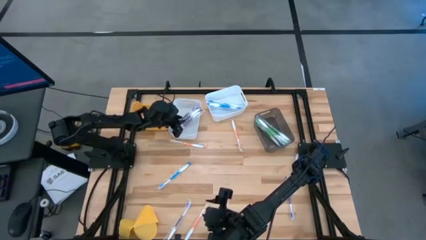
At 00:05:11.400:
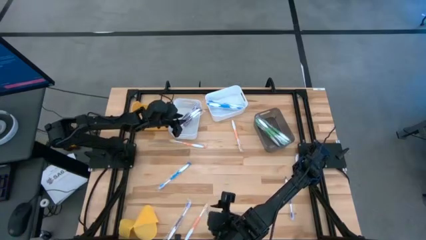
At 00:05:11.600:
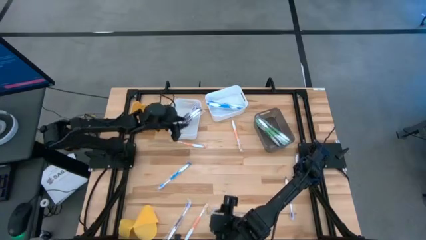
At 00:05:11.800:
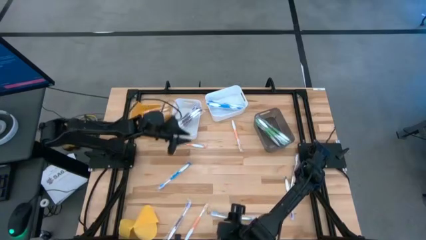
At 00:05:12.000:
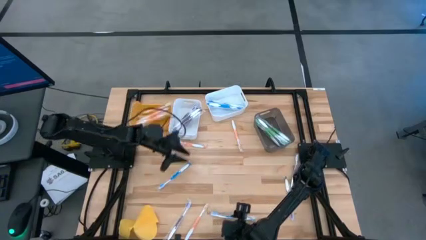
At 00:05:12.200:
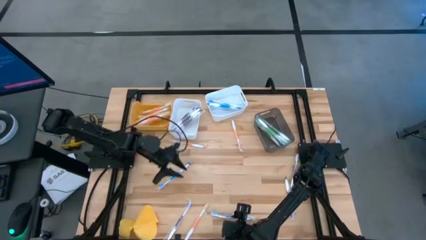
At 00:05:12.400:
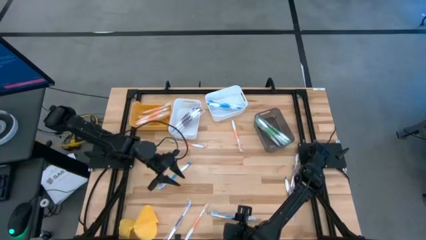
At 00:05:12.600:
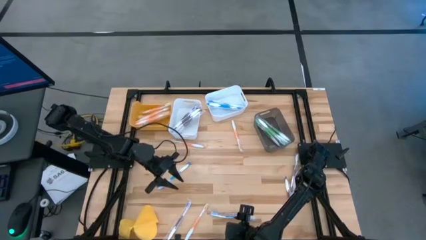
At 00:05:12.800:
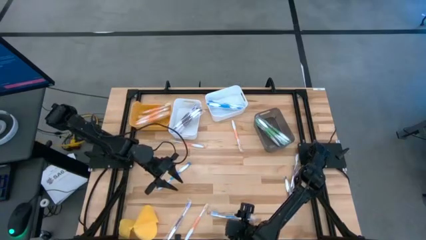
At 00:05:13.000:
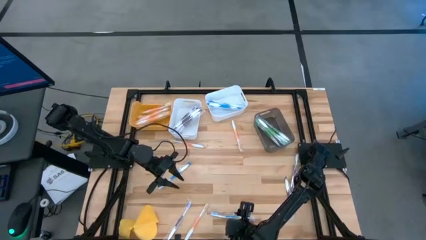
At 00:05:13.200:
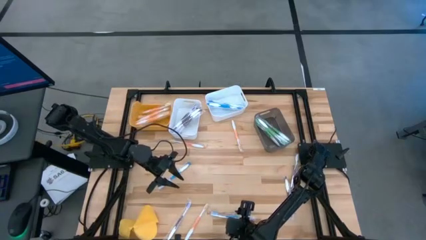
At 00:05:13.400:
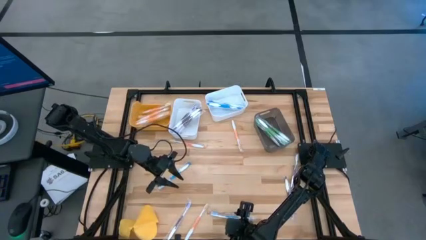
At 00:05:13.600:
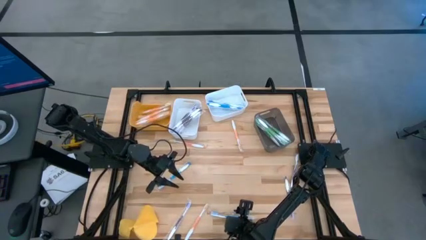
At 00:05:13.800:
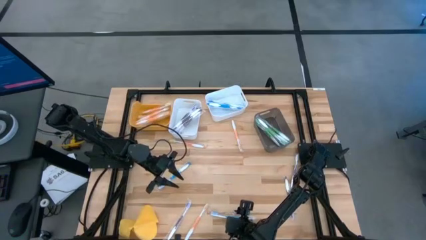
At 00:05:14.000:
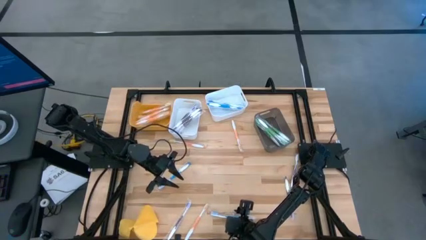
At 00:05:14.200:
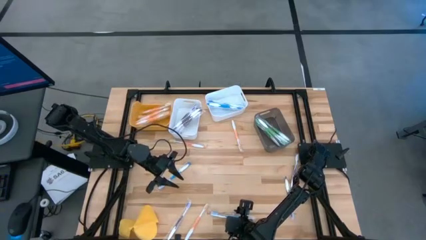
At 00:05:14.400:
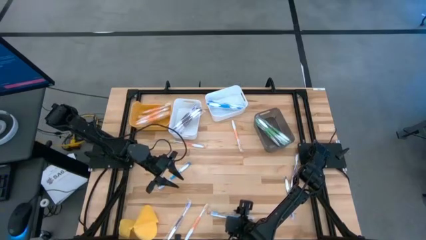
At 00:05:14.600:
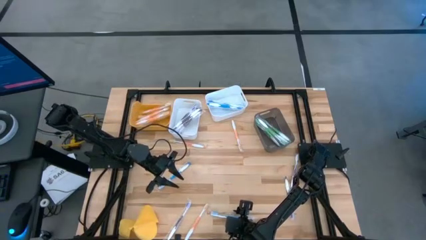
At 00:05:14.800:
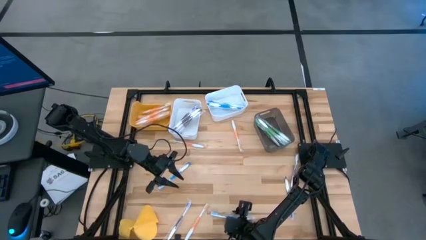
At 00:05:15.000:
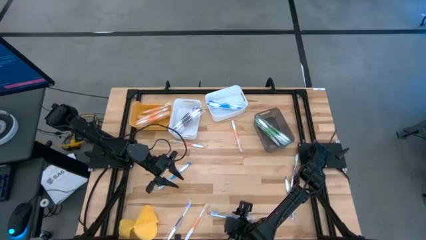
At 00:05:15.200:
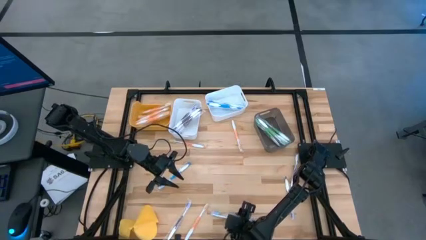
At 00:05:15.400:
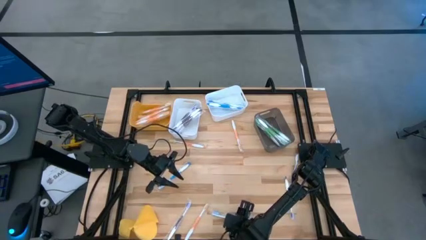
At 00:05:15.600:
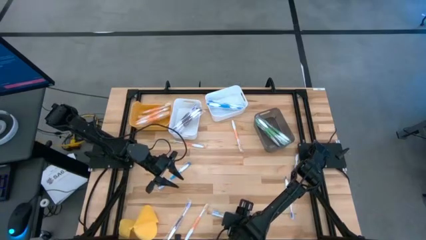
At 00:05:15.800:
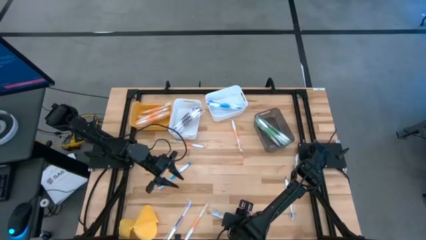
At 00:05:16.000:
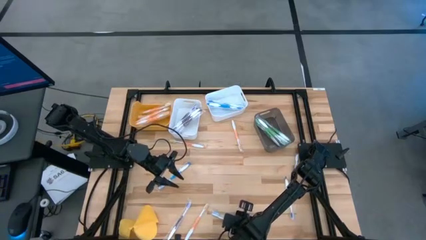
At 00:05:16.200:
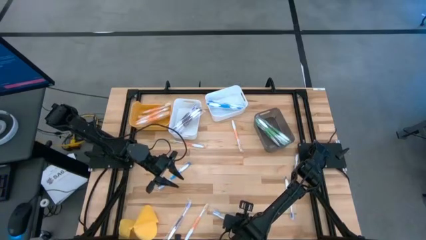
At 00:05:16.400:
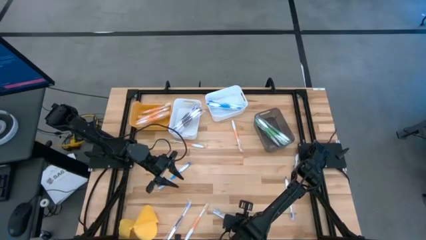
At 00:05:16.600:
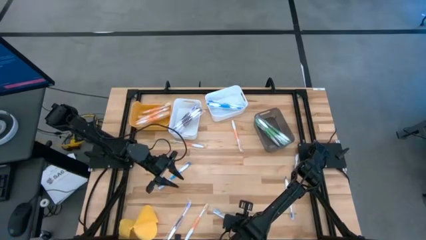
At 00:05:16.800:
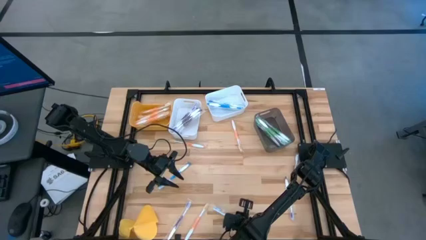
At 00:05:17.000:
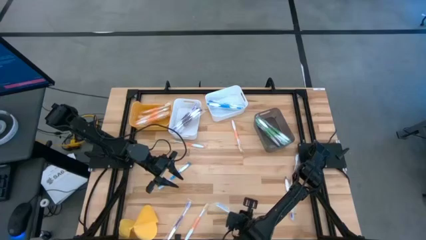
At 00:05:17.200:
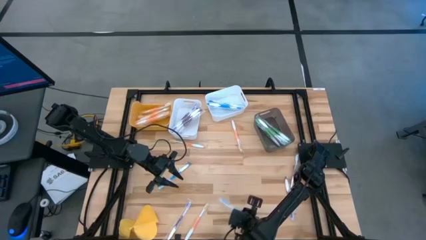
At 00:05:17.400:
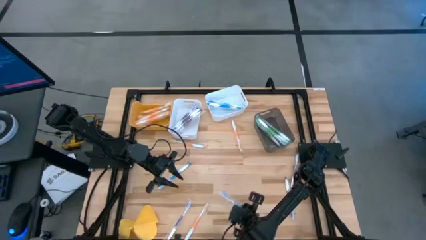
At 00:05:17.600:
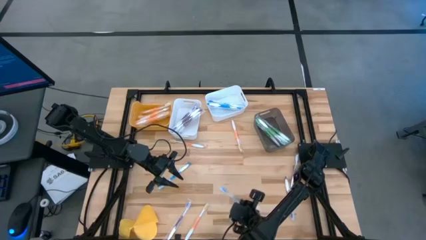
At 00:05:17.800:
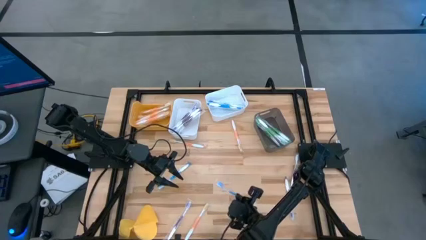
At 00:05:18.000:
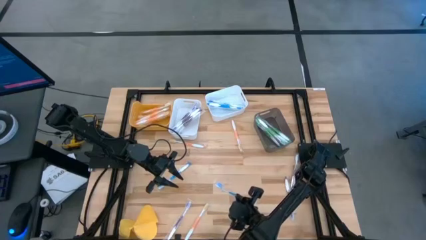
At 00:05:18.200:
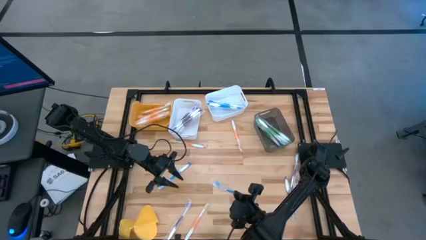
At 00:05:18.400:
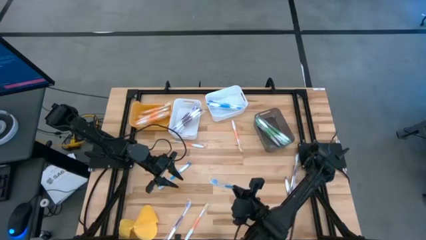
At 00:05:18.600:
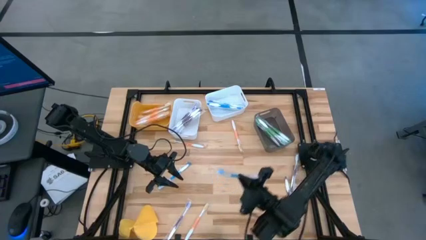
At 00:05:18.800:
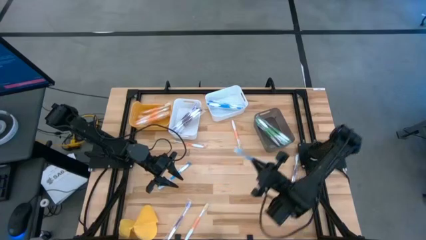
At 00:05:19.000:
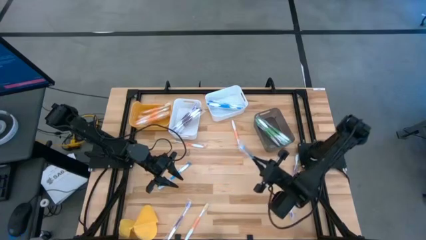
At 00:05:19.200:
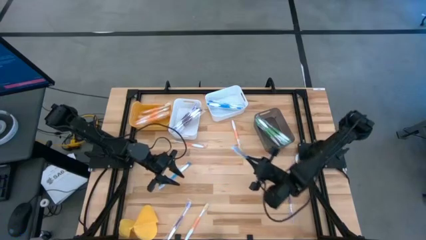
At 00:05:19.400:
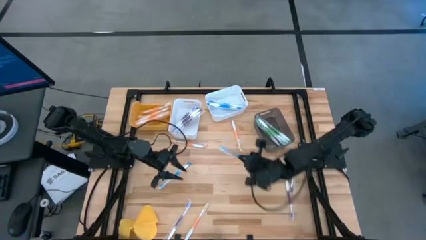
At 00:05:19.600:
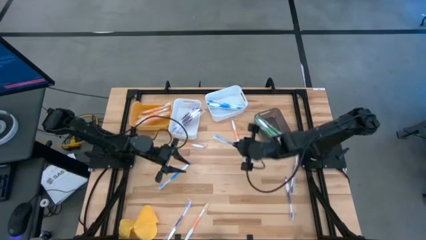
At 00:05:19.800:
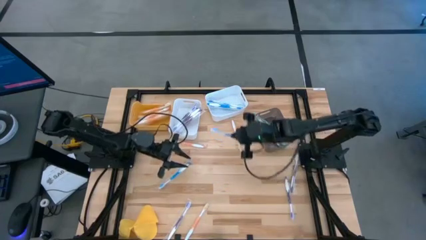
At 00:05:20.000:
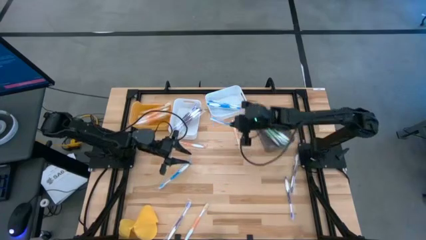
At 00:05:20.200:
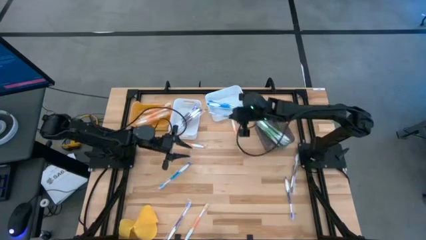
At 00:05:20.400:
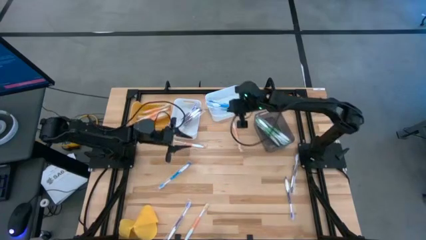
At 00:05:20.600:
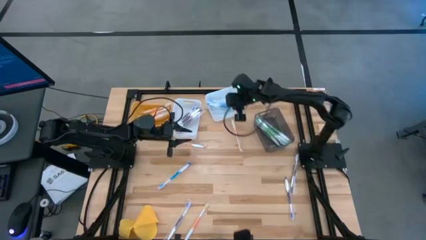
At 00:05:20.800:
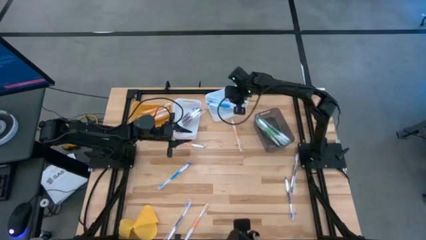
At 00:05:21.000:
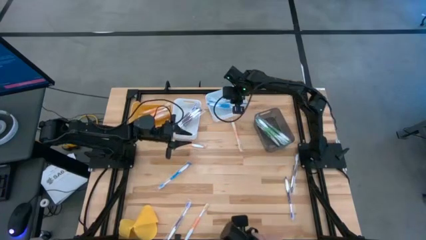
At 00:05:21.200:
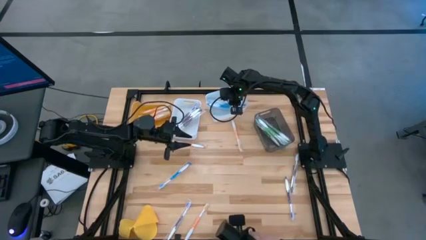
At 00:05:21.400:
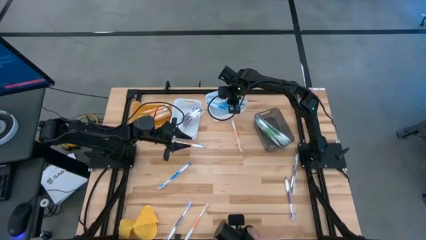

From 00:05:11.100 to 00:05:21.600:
Task: Pick & Place Toothbrushes
Put the blue toothbrush into the right white bin
